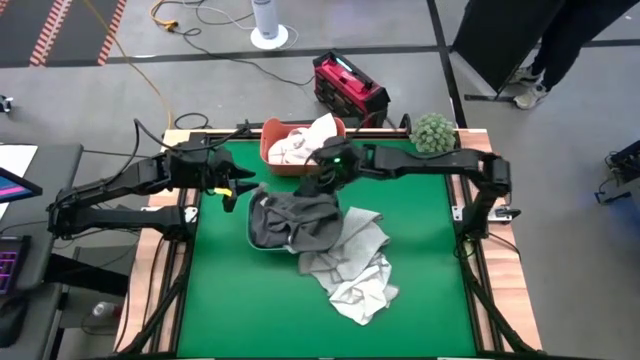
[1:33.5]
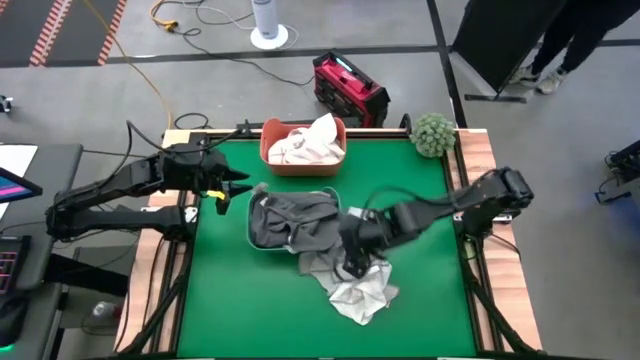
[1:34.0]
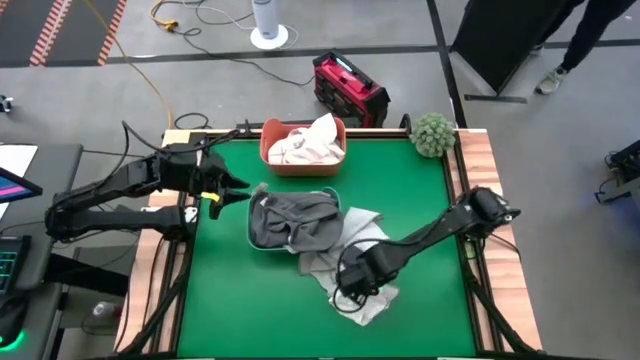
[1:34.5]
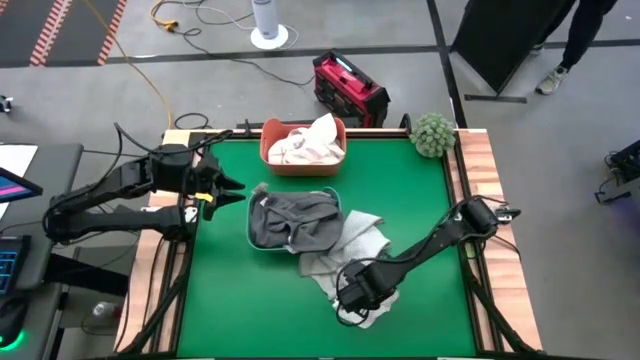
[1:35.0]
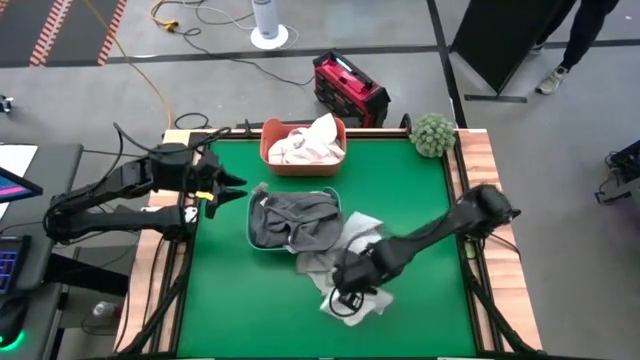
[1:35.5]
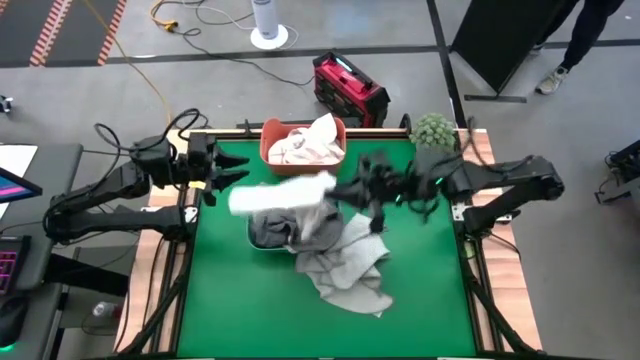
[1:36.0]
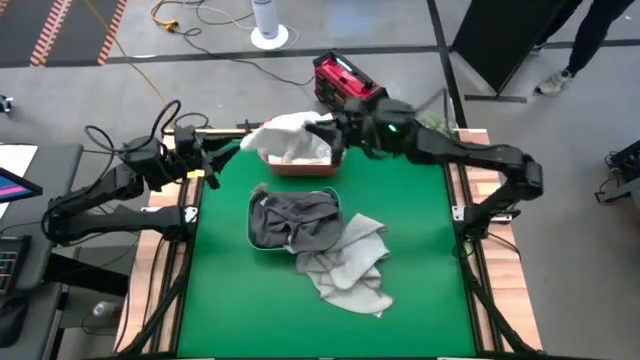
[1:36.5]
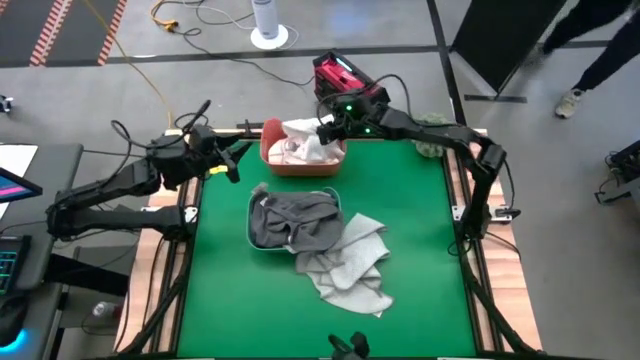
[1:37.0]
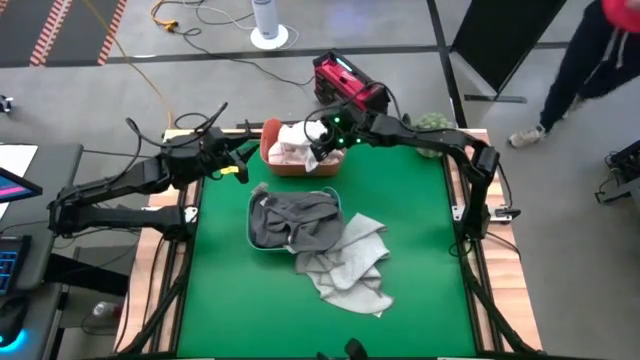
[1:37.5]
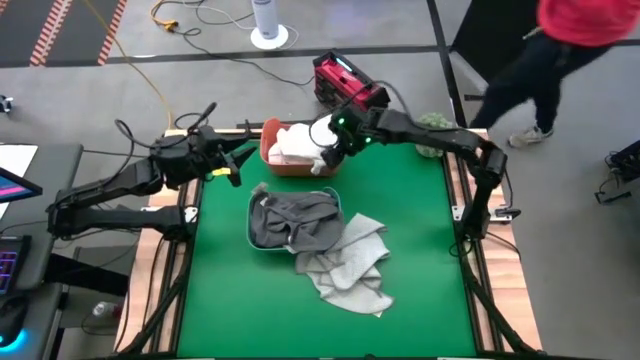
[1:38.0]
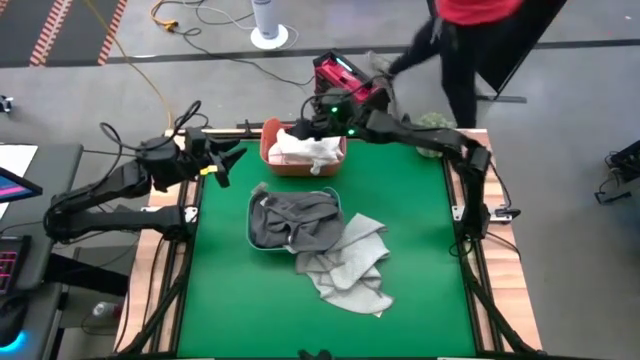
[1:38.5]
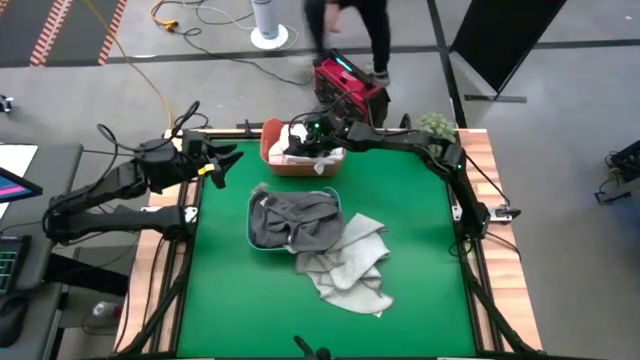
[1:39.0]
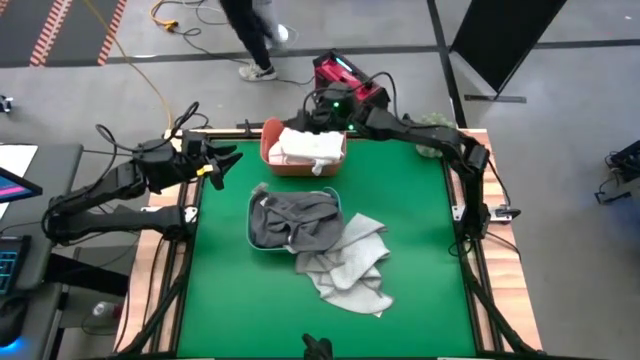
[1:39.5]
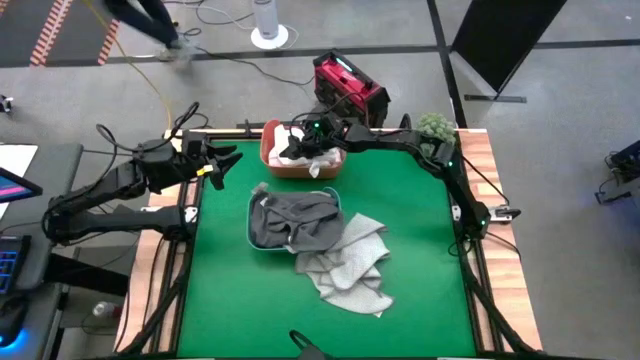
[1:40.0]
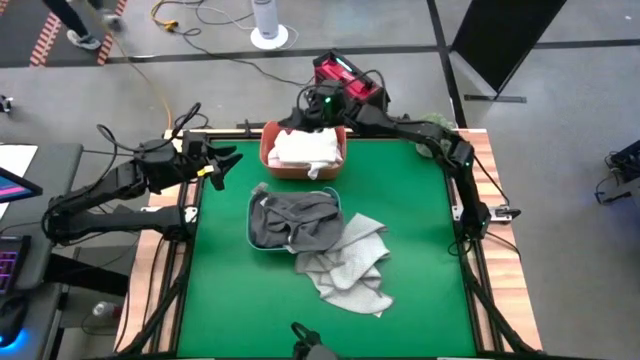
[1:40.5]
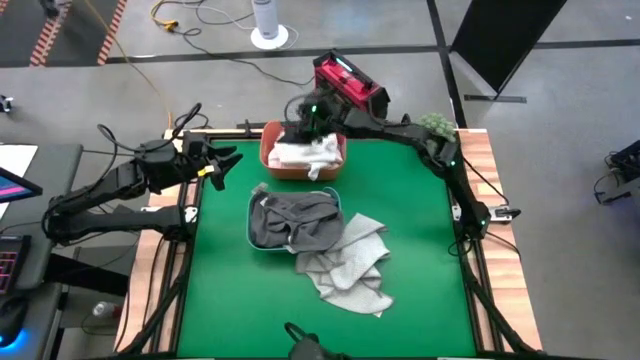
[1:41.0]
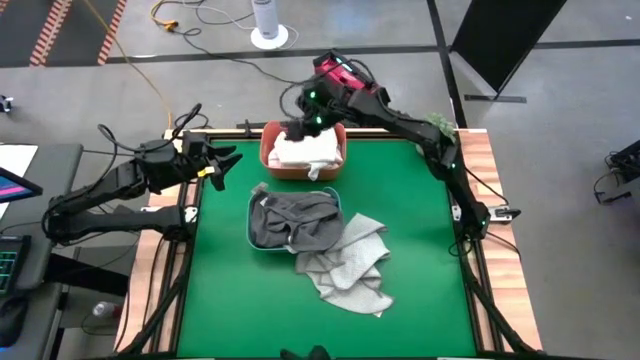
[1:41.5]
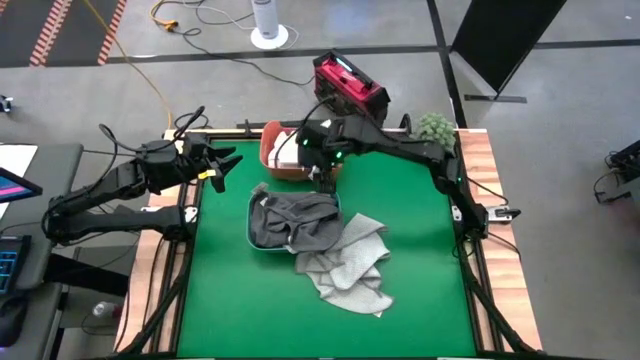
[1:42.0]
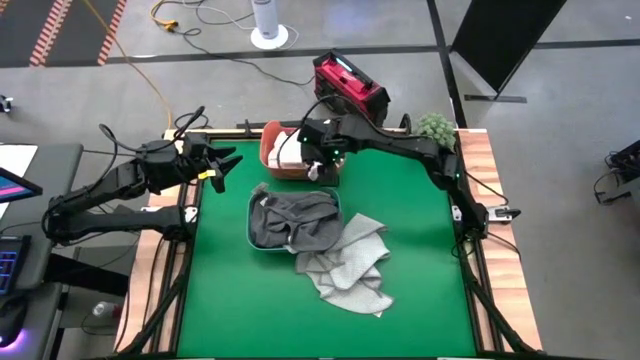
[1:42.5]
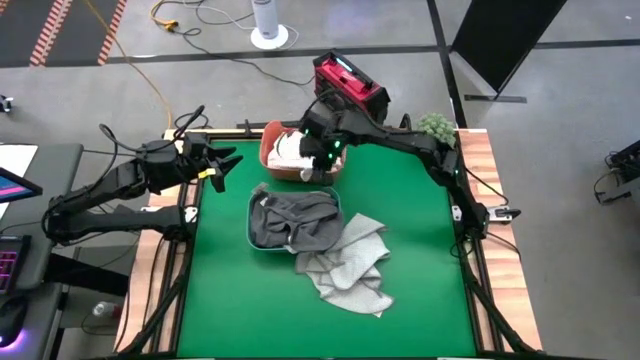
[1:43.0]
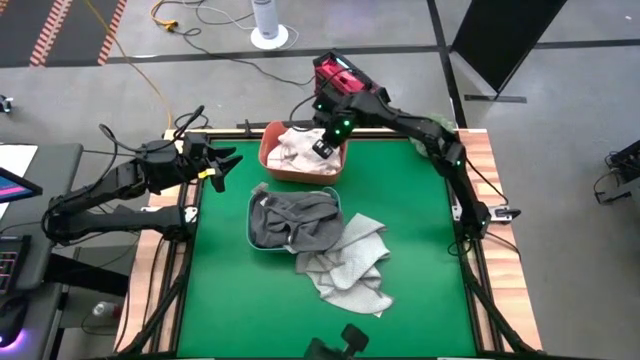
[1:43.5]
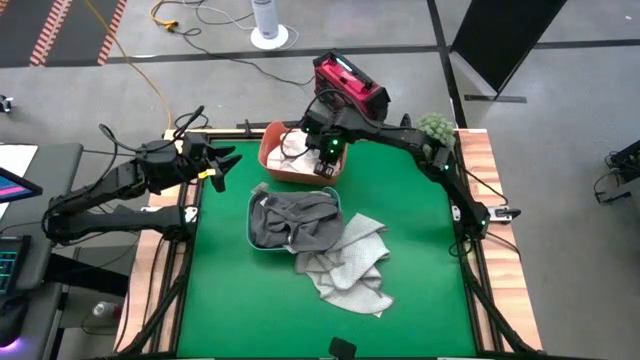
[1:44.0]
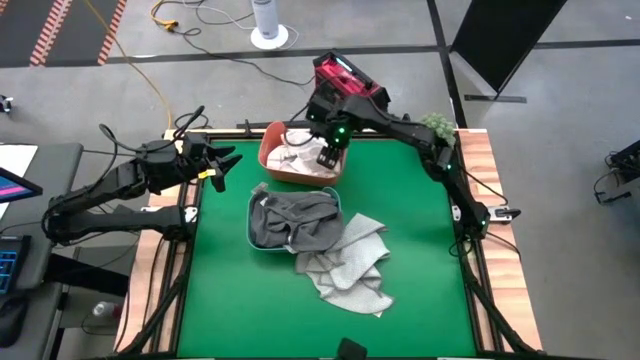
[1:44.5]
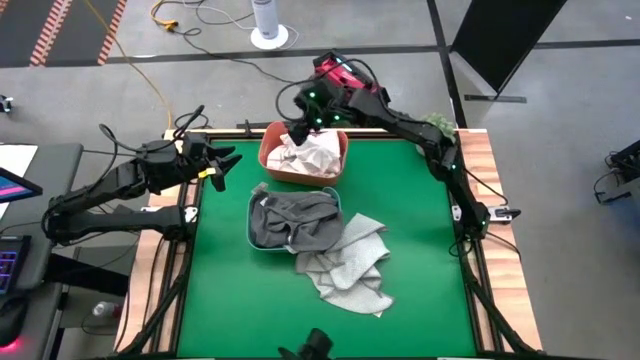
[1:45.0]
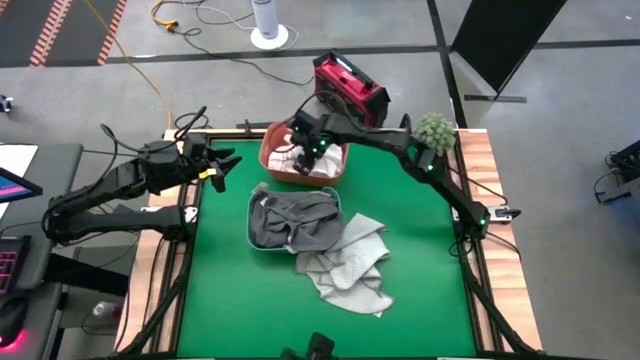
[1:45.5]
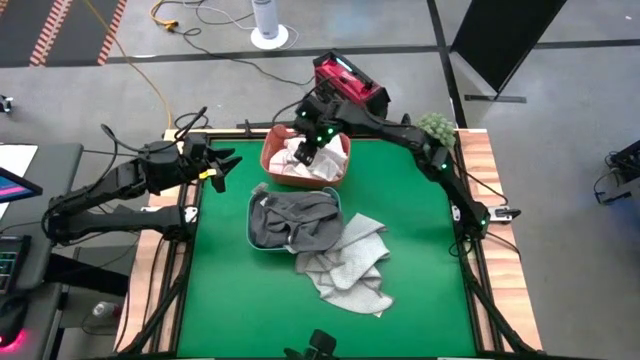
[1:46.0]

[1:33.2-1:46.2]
Task: Sort towels by color in basket
Put the white towel into the orange bin

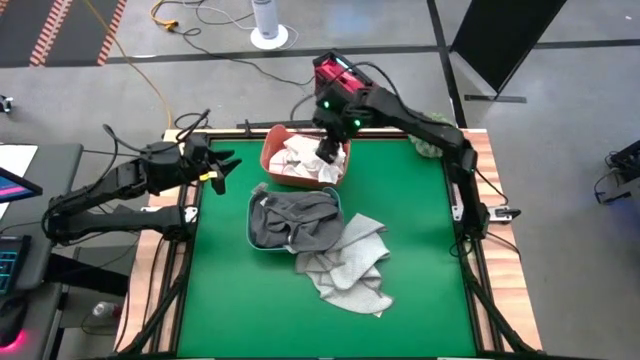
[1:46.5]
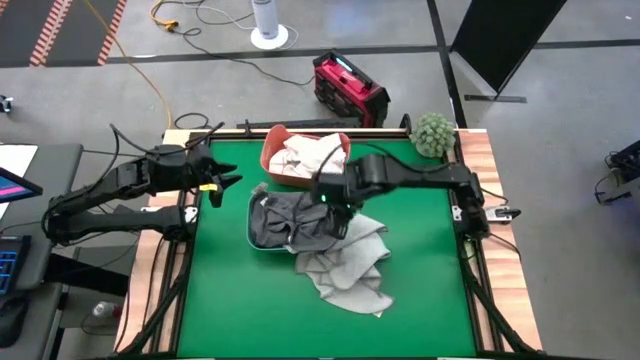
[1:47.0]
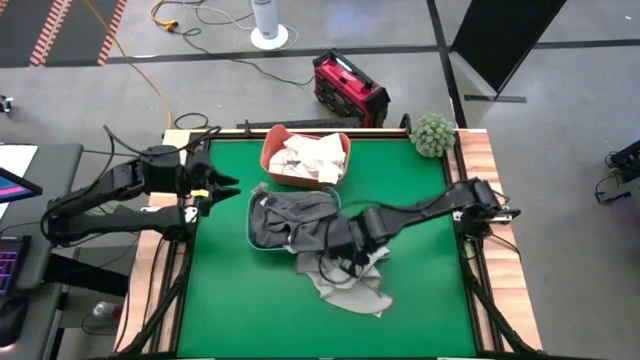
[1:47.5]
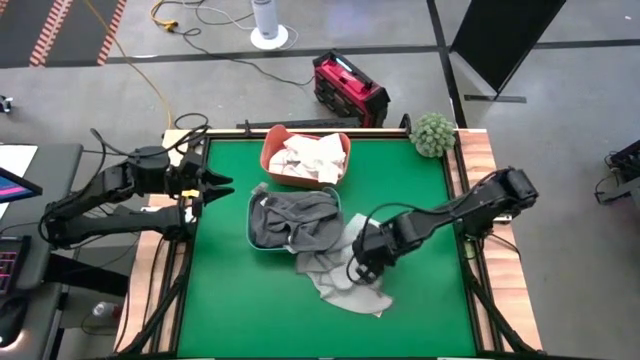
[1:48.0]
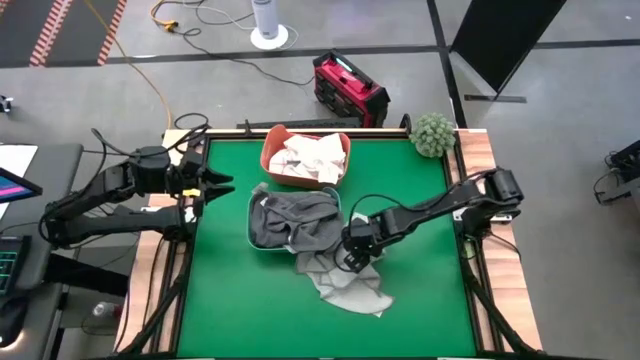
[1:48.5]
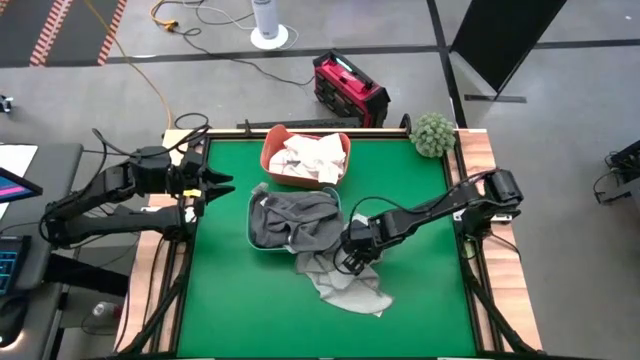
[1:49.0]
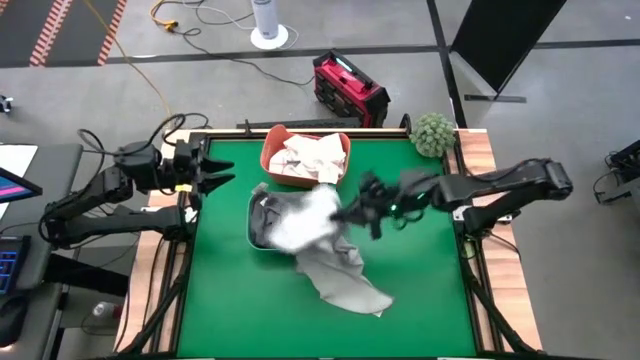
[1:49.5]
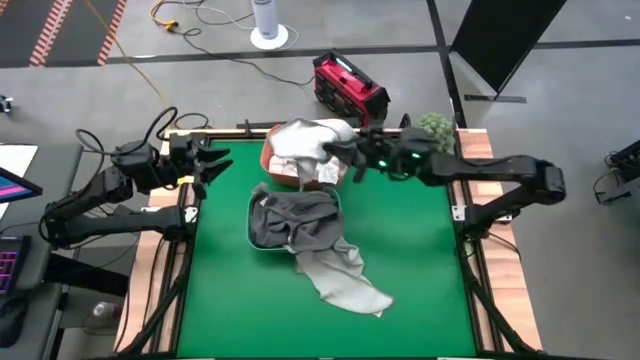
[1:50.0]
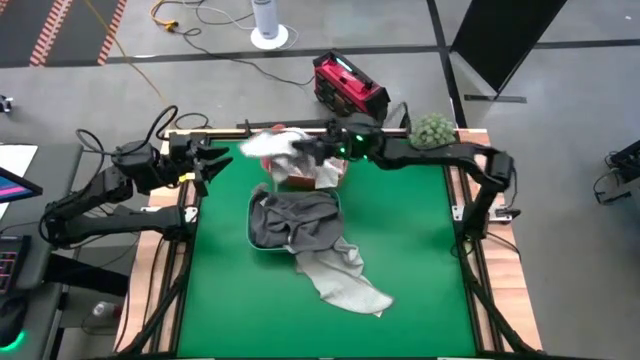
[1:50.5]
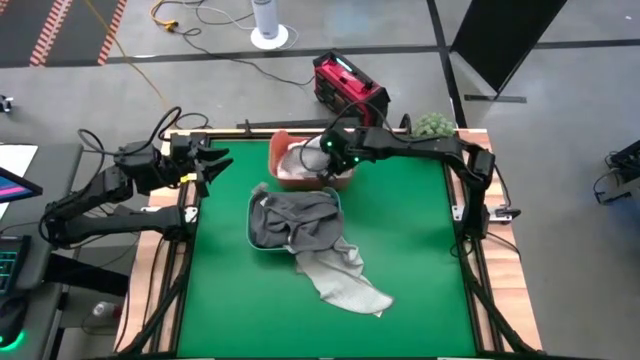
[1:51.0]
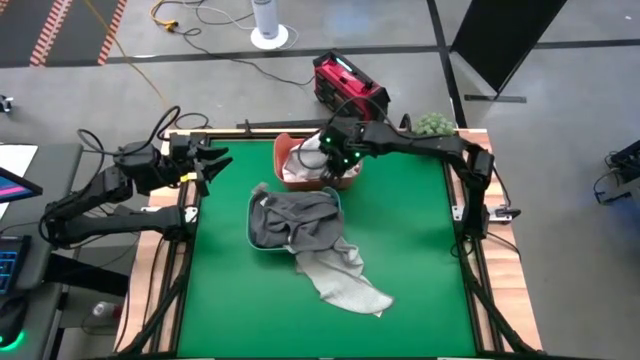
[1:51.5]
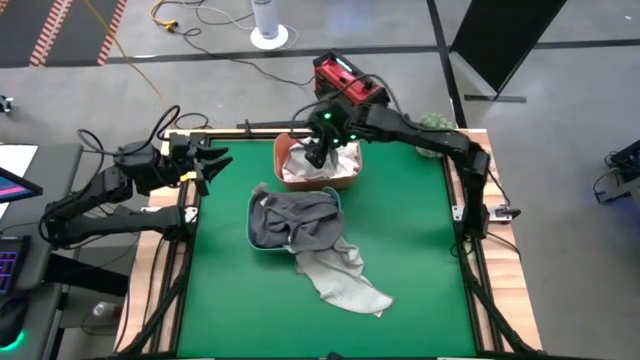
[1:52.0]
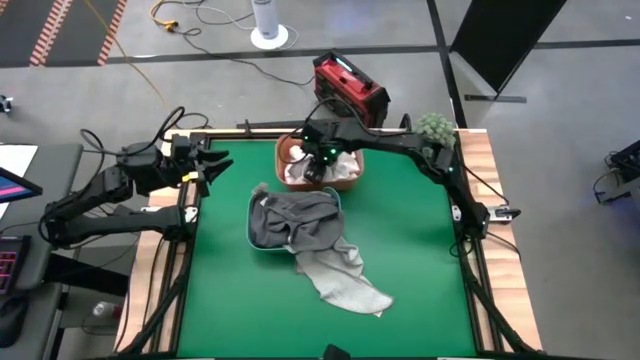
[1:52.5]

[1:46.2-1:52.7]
Put the white patterned towel into the orange bin

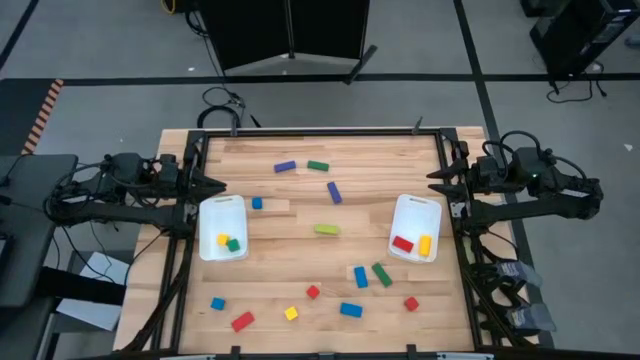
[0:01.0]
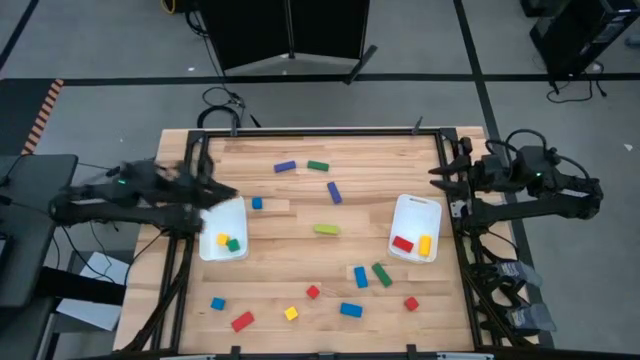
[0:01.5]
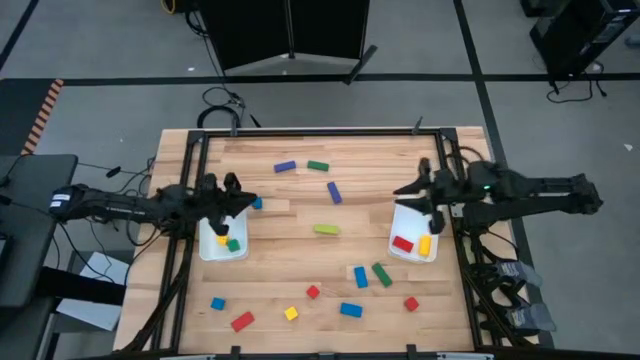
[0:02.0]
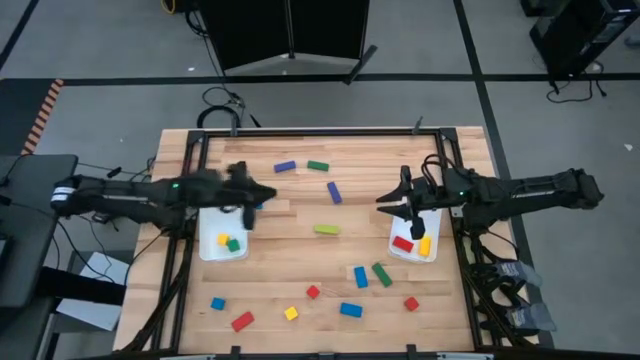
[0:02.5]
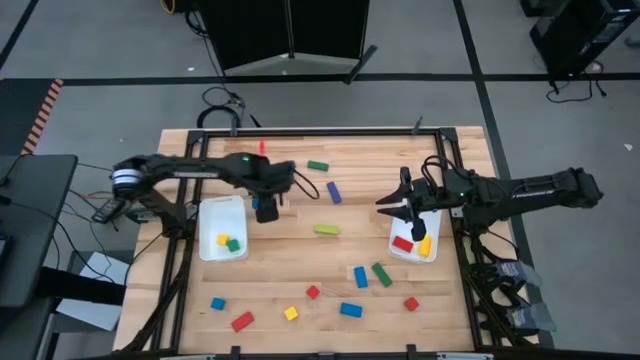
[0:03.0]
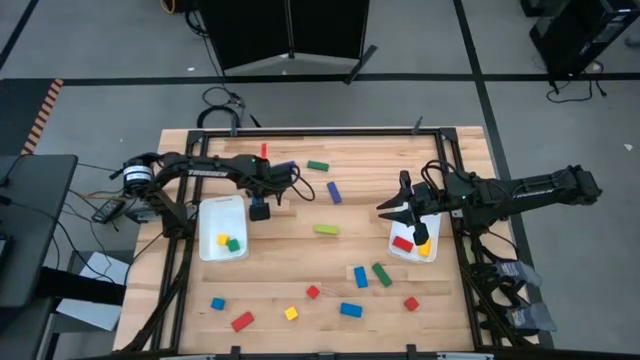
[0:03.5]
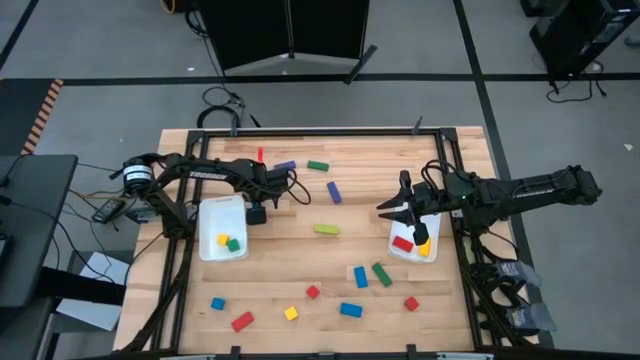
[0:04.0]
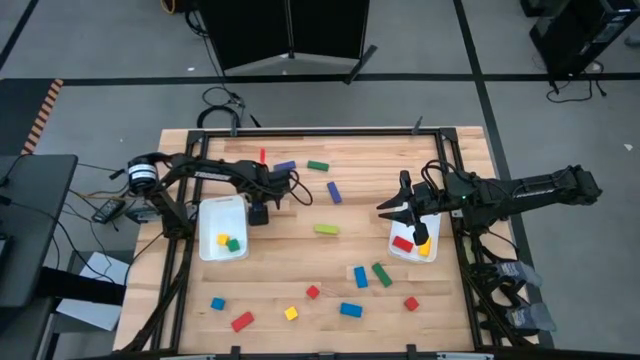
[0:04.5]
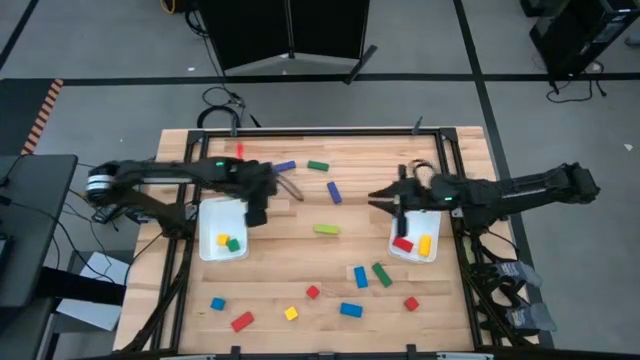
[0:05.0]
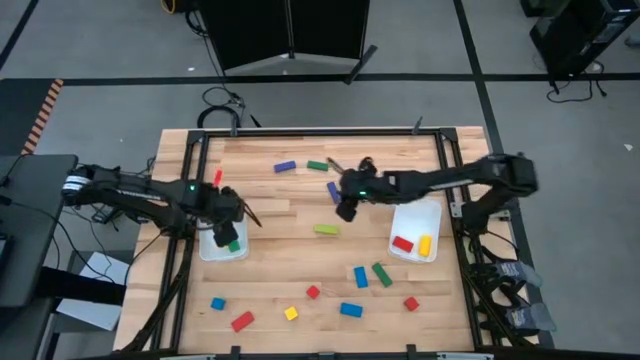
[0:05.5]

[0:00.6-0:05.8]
Task: Sort blocks by size
Put the blue game piece in the left bin
